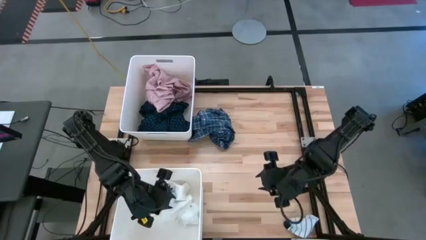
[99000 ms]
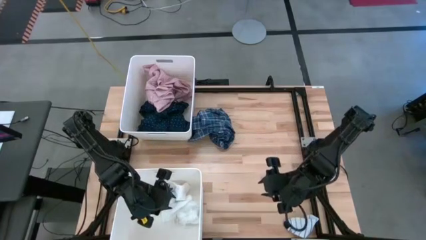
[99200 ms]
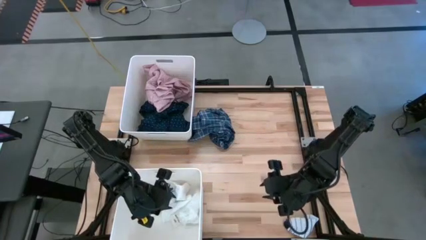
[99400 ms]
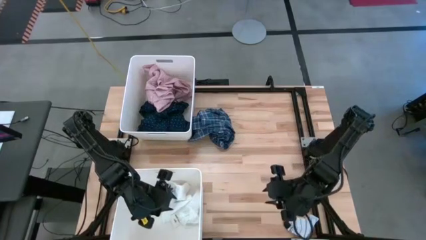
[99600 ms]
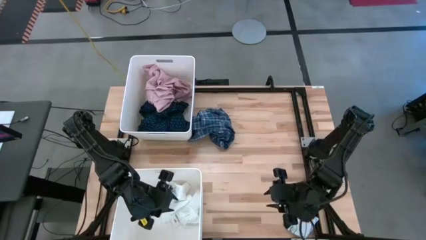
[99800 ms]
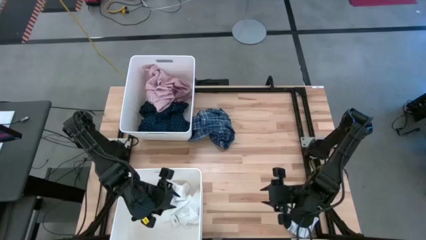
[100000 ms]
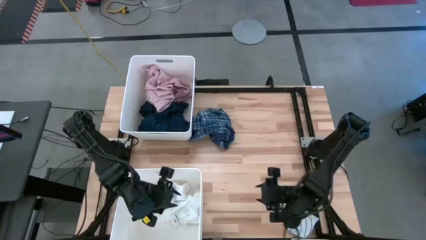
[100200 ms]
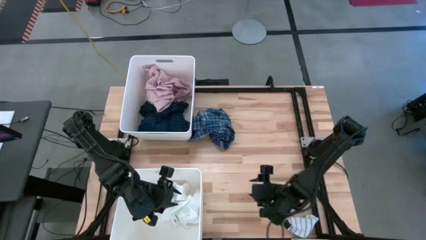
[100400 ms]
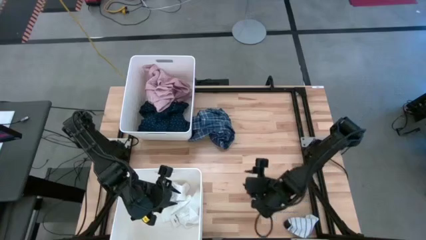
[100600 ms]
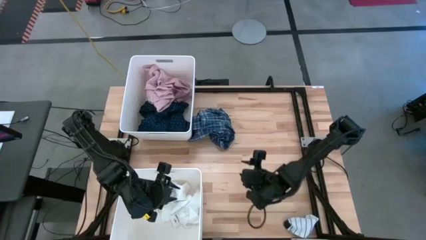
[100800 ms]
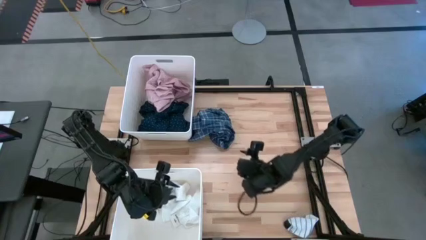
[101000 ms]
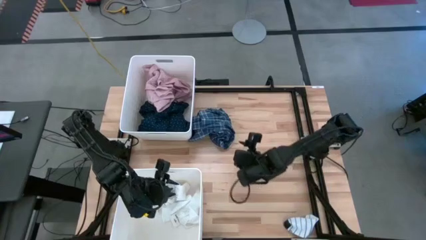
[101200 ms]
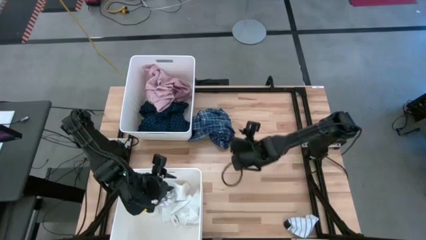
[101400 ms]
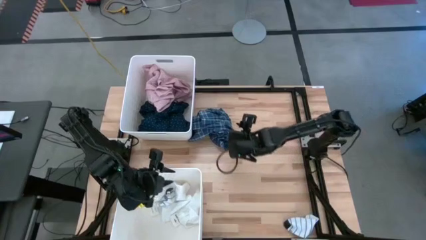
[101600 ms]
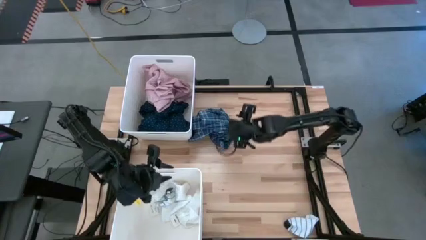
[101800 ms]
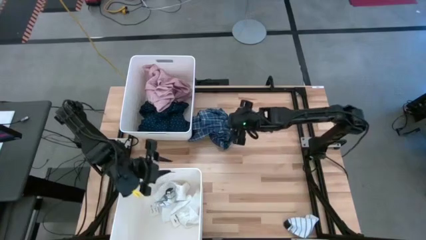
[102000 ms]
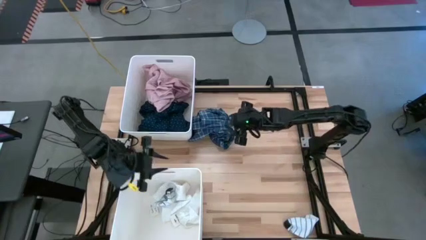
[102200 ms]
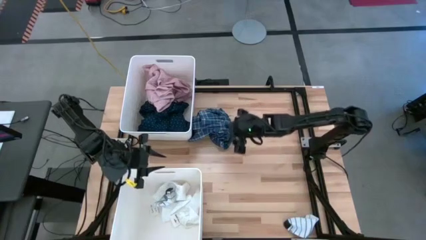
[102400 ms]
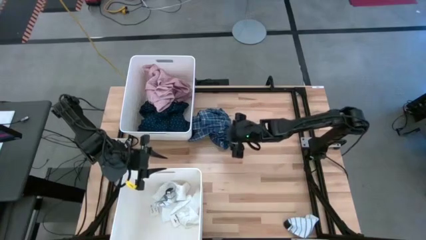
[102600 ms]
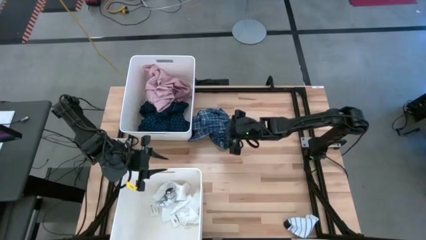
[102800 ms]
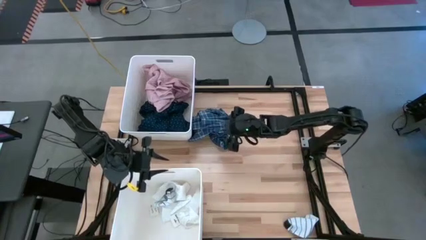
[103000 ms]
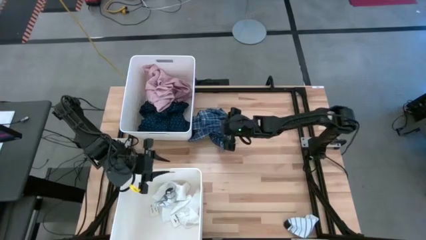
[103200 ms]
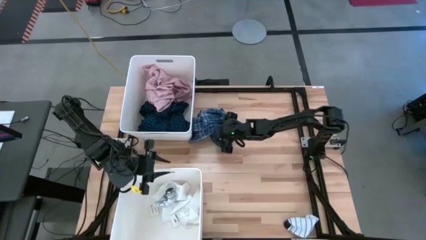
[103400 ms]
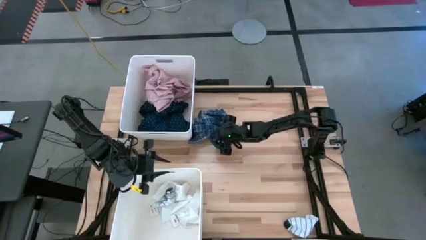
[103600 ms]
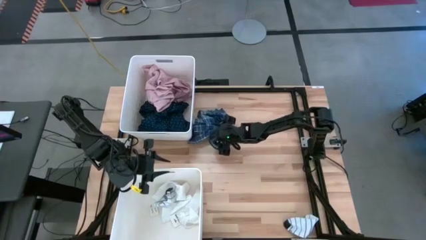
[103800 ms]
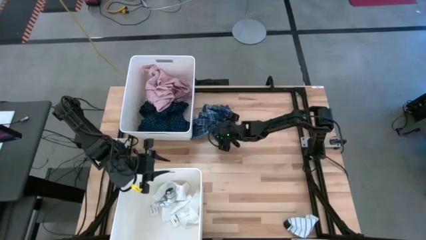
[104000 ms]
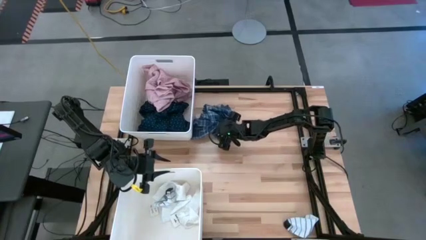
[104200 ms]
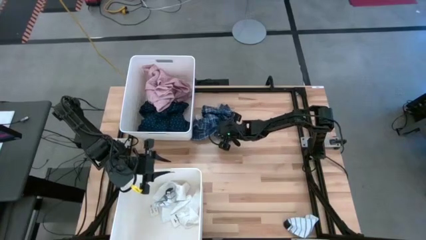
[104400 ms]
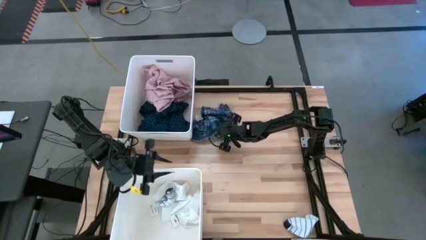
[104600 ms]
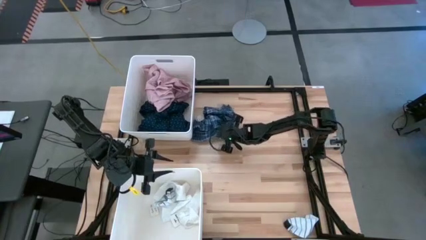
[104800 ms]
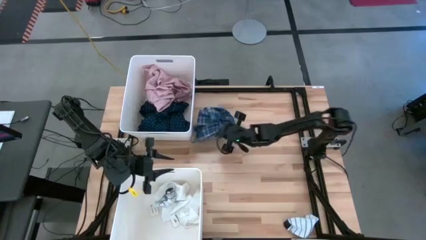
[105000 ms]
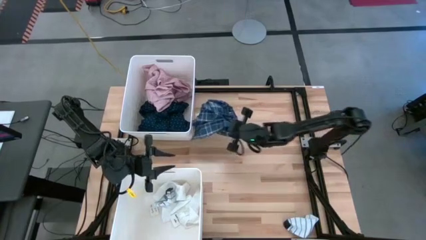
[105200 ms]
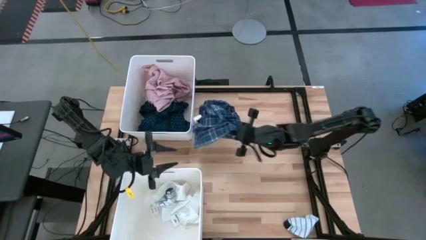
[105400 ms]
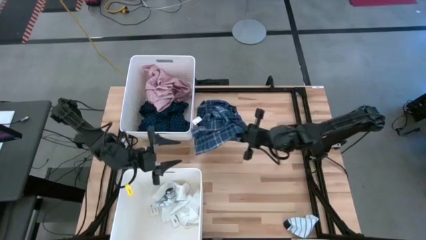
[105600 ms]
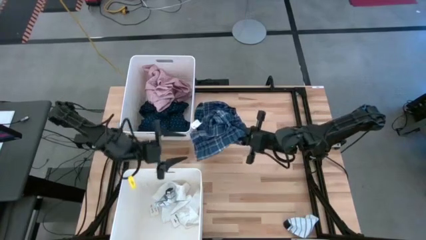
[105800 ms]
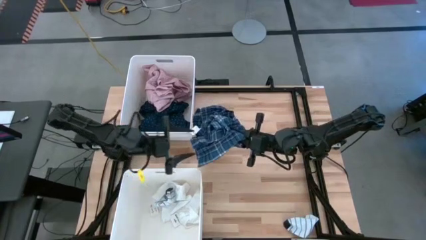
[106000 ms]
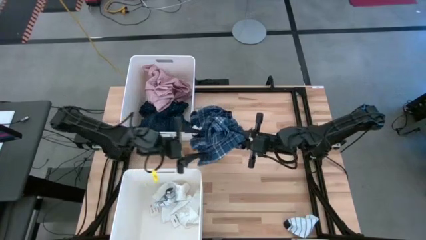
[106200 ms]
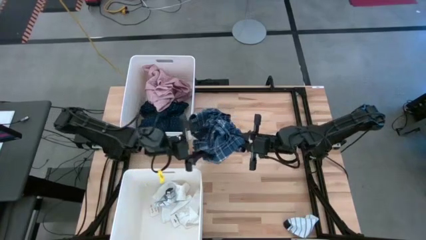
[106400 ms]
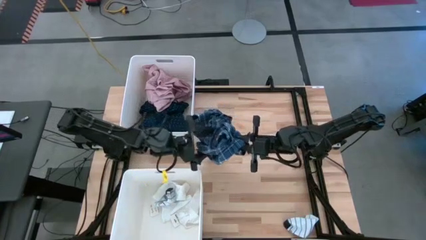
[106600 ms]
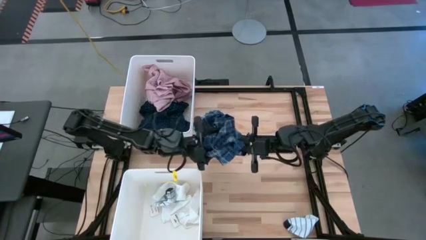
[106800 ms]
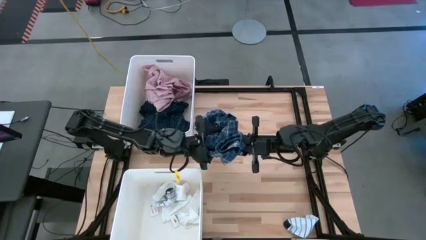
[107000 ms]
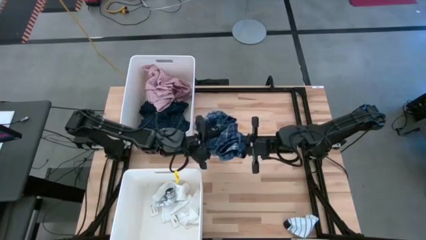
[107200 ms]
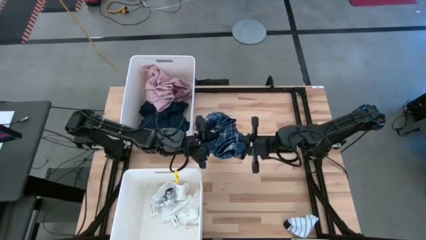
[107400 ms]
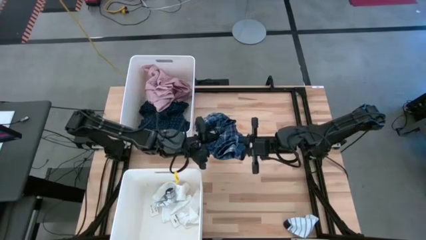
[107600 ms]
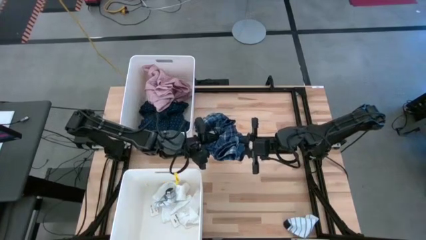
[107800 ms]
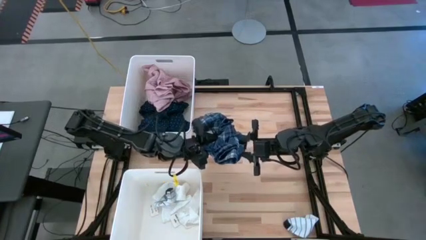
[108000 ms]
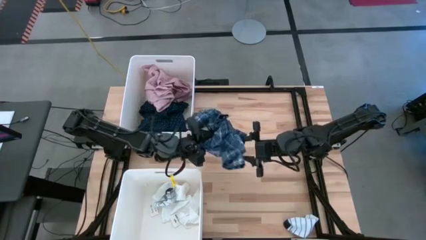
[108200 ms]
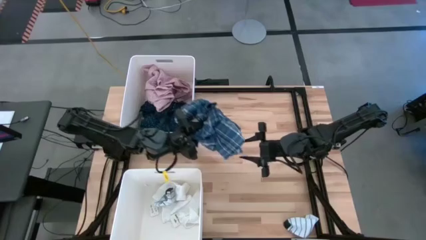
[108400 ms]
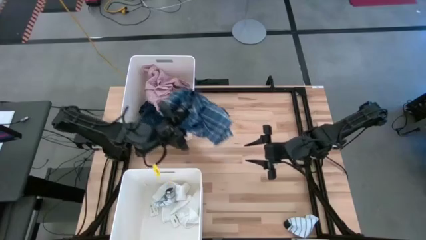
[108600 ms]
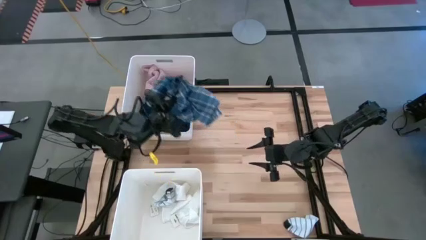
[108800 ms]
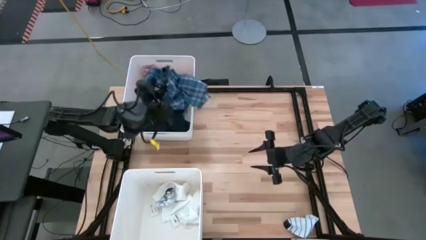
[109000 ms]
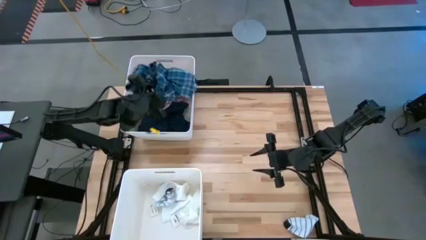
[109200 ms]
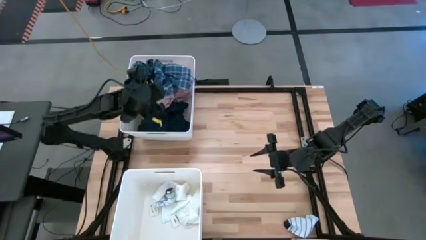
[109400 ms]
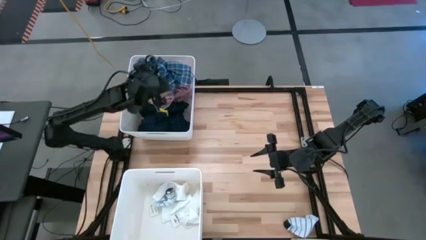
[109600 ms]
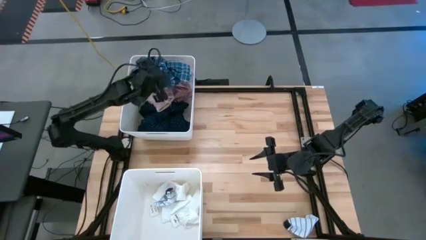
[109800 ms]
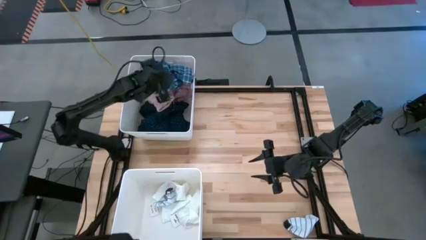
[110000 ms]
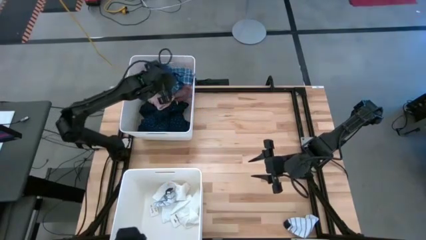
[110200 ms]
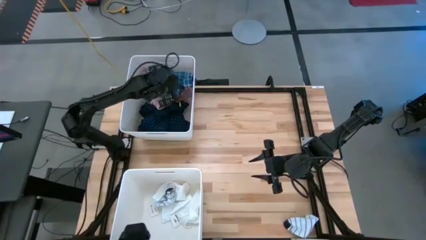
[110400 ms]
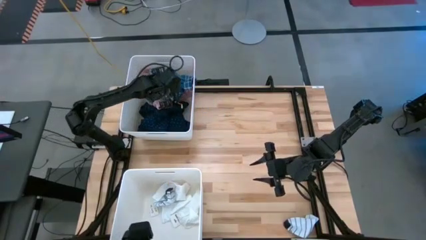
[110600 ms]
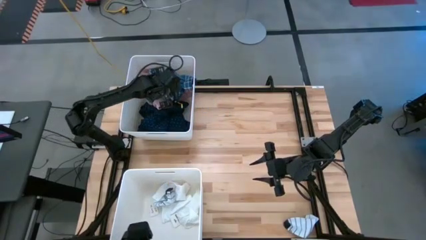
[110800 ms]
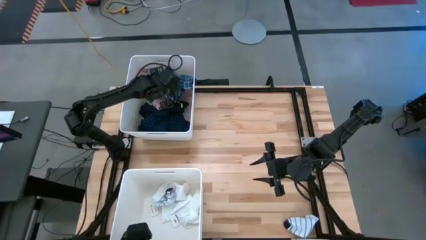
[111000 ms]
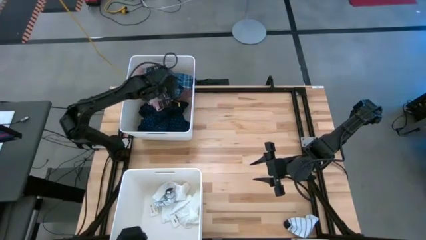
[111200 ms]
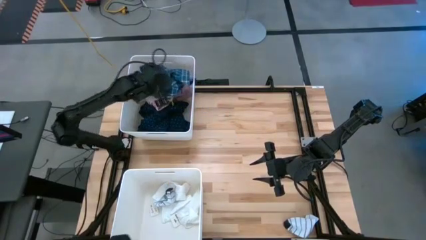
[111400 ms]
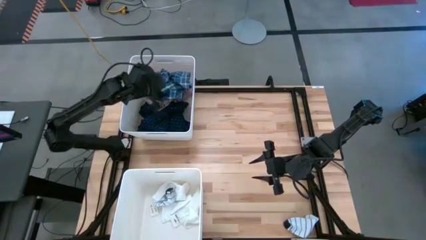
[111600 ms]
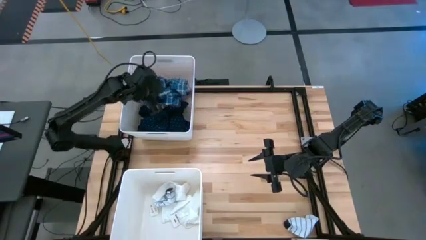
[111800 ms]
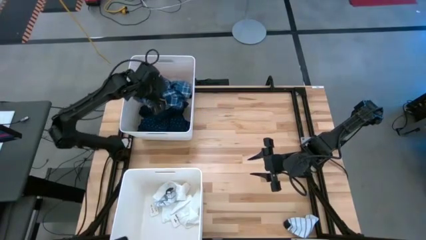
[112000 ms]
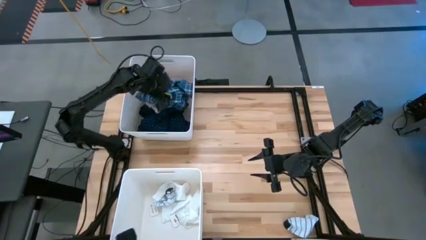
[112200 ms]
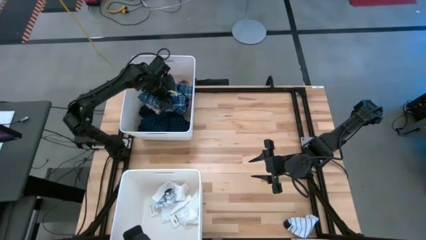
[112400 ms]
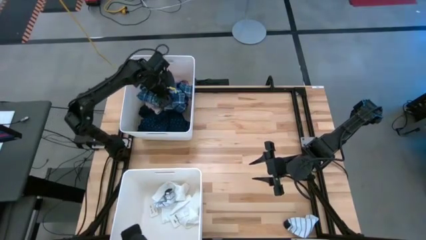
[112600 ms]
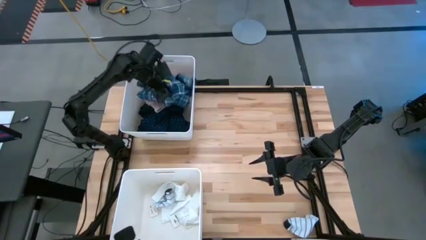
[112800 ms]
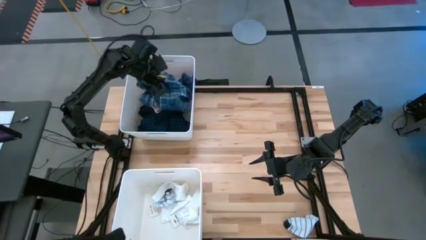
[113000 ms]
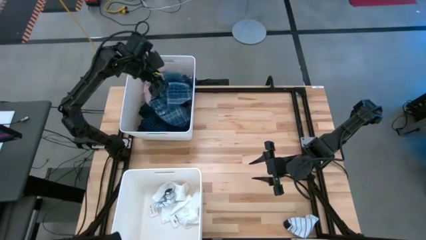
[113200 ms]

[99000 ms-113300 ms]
Task: Sort clothes
Put the blue checkered shorts into the top white bin

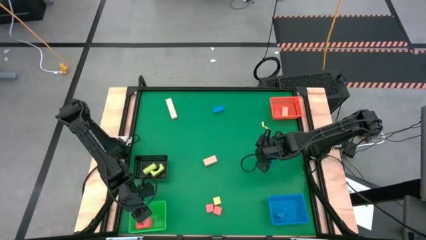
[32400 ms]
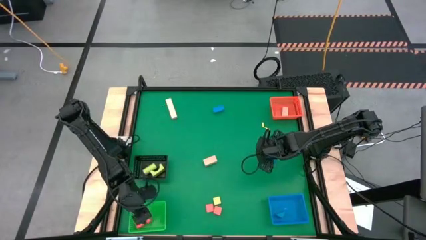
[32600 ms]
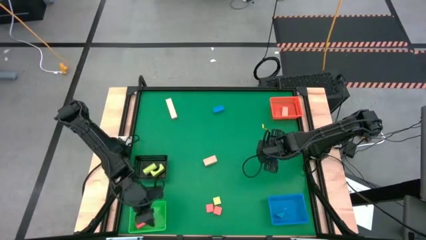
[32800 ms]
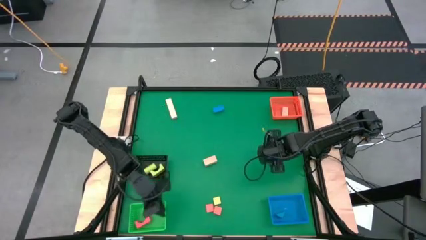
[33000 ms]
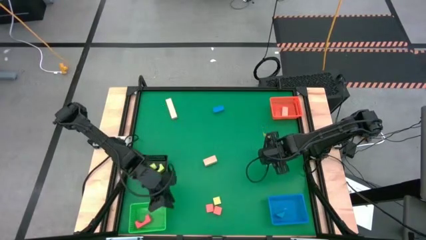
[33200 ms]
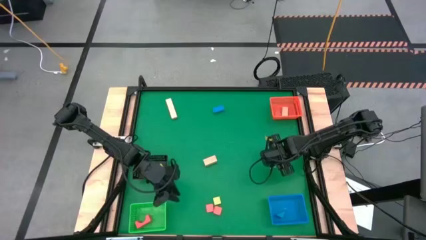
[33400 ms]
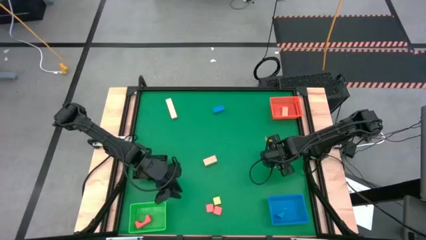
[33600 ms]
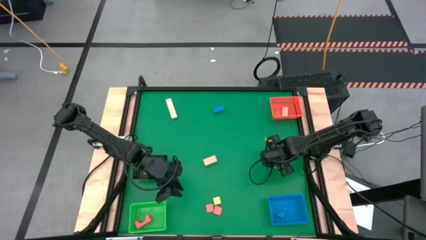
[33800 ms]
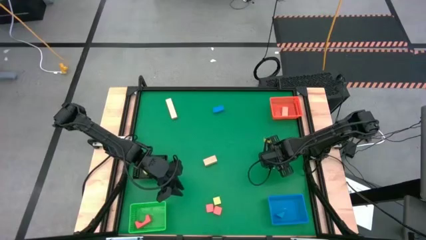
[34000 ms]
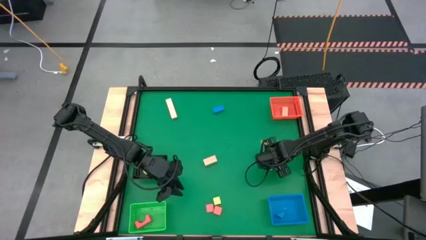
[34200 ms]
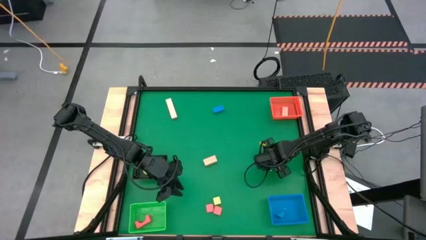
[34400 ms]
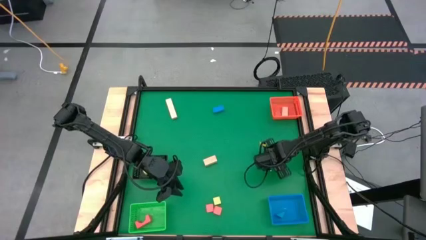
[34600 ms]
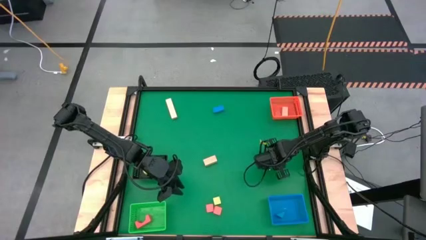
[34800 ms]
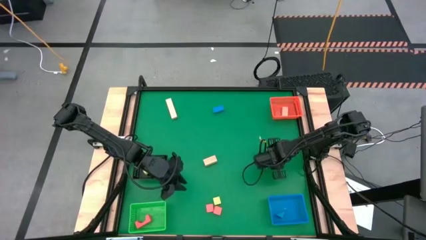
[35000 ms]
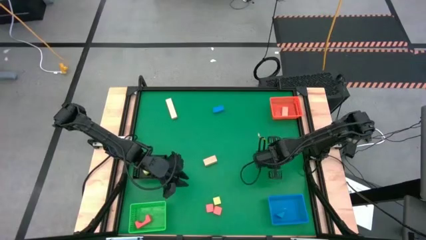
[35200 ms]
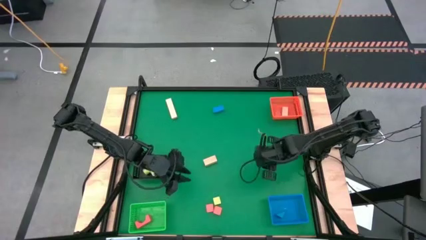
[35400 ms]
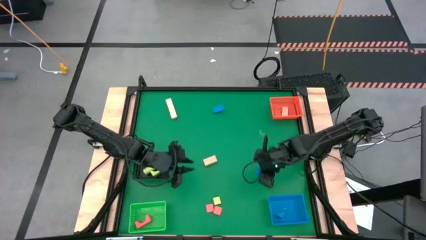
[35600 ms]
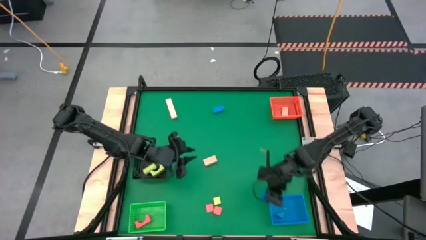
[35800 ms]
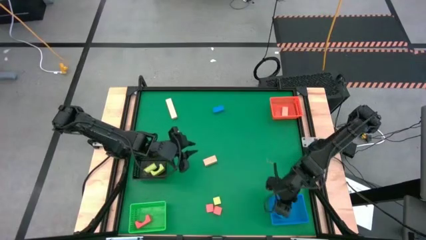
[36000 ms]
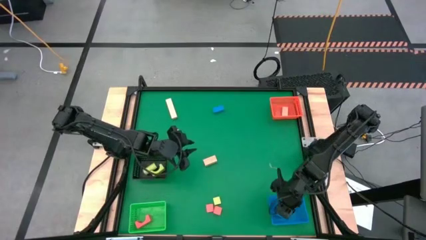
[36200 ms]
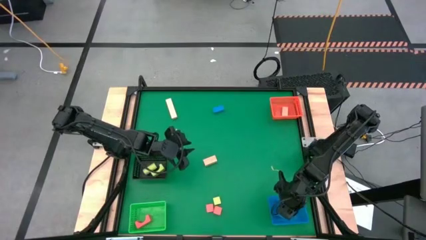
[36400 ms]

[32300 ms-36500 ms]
Task: Sort & place blocks by color
Put the bottom blue wooden block into the blue basket
